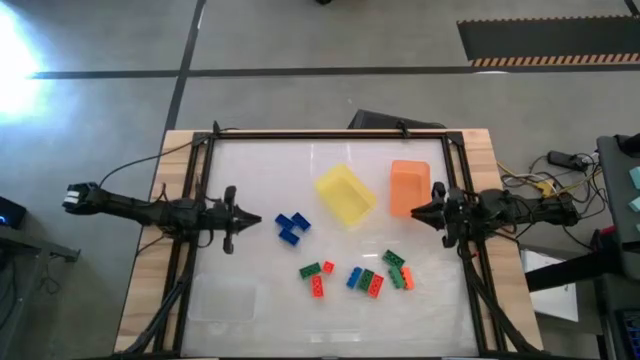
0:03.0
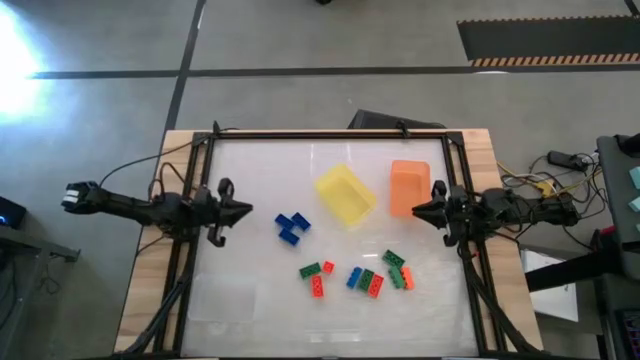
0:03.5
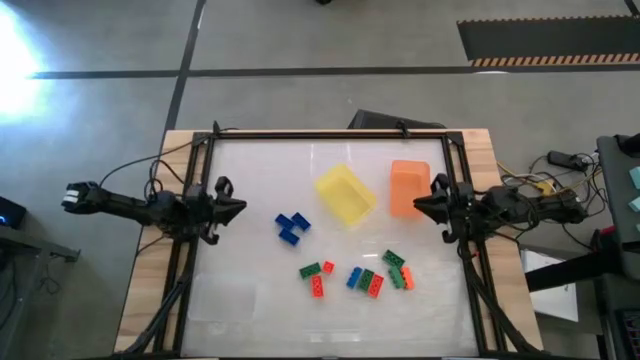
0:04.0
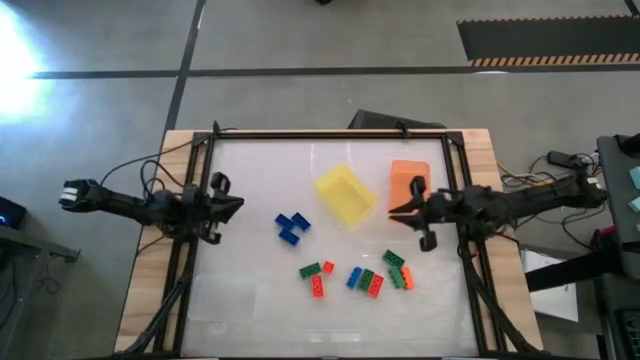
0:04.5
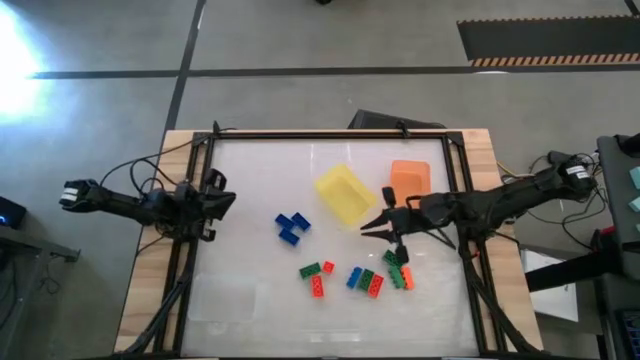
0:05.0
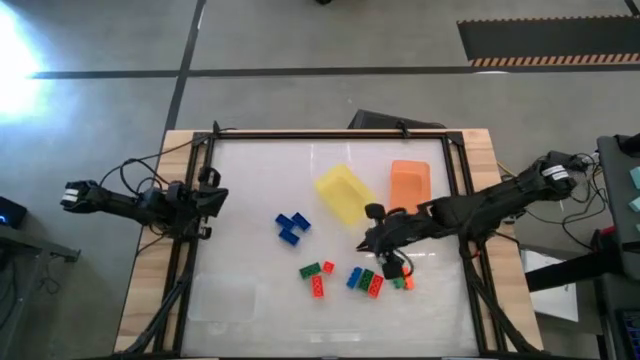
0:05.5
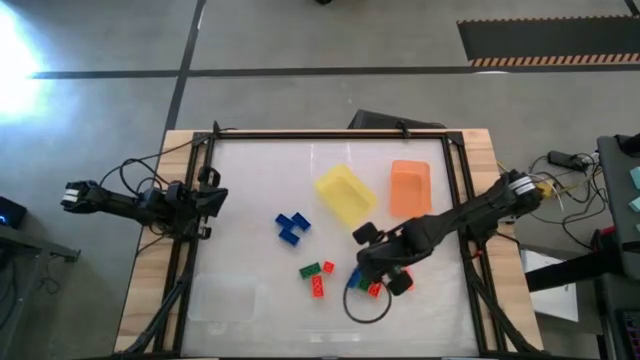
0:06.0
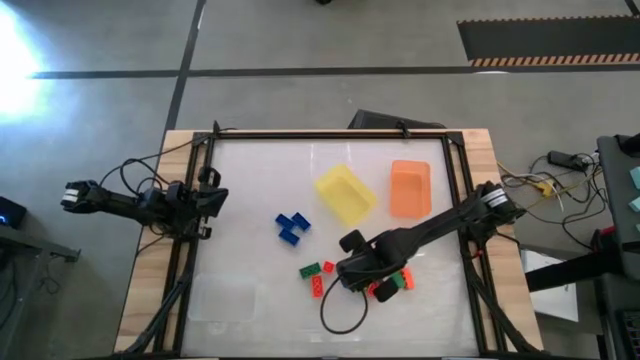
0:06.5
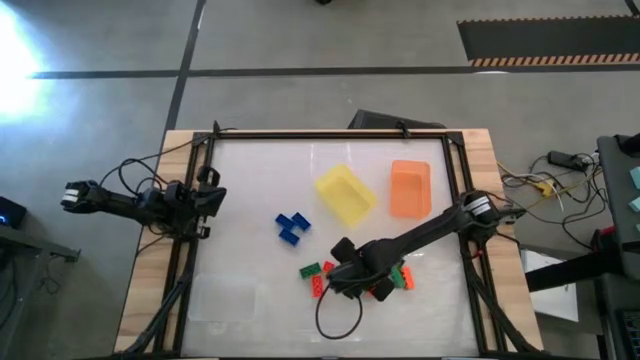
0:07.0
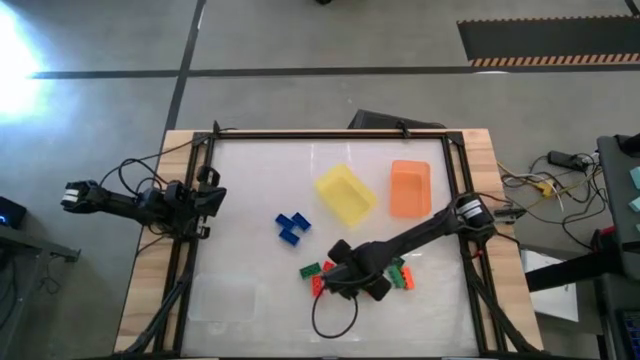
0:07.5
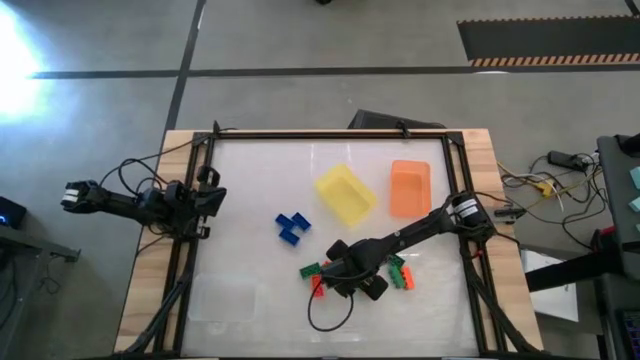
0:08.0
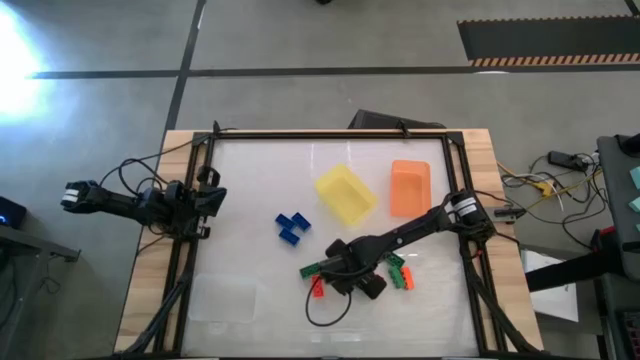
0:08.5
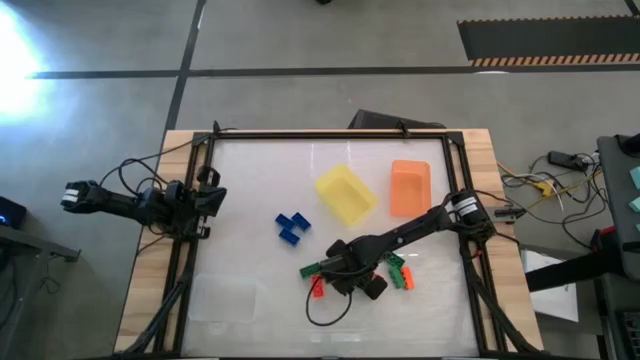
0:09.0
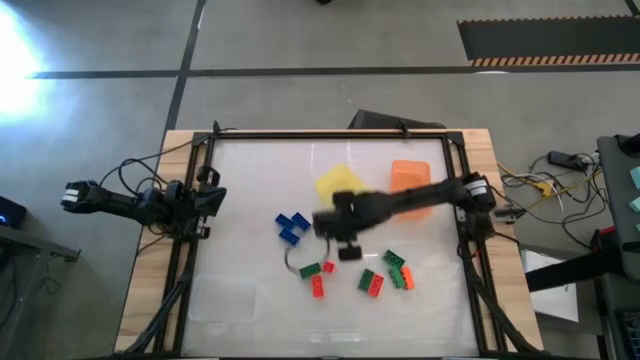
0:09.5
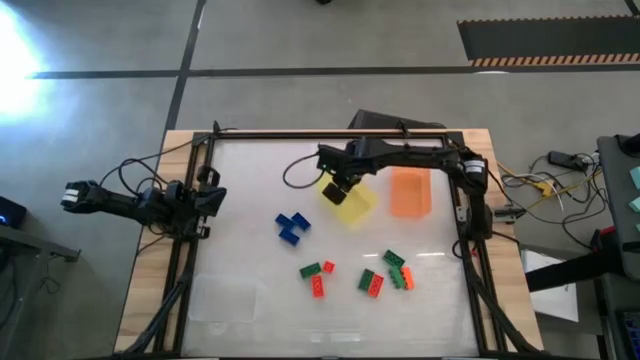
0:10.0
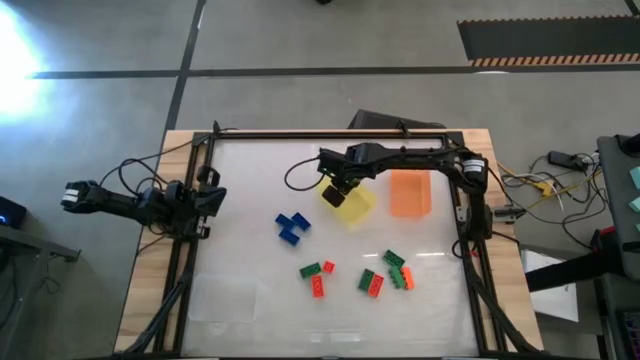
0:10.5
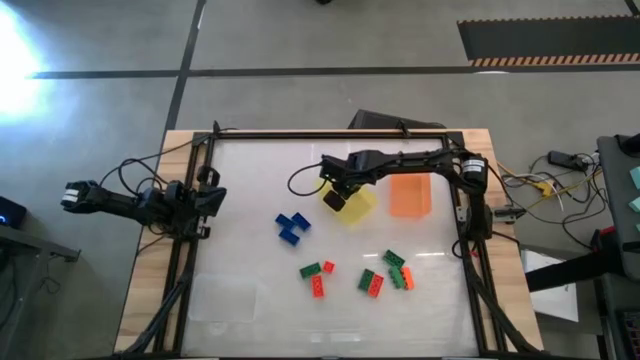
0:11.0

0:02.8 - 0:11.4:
Task: Sort & place blocks by color
Put the blue game piece into the yellow bin

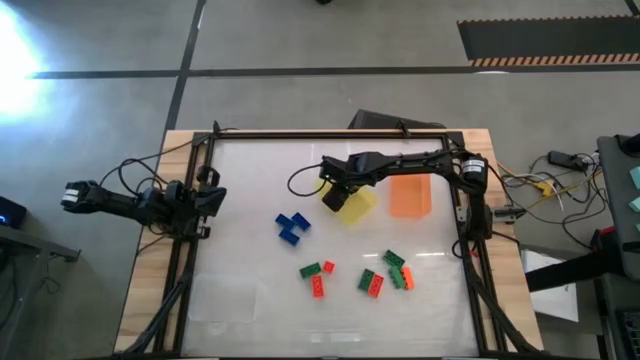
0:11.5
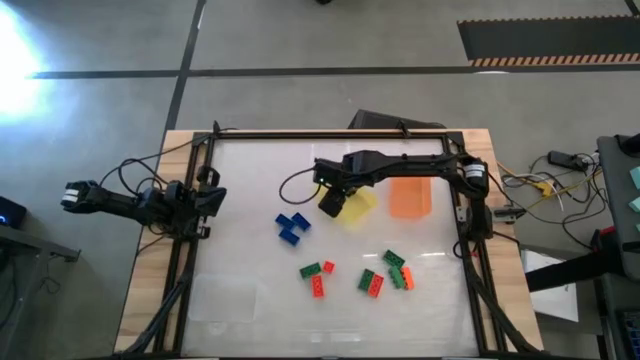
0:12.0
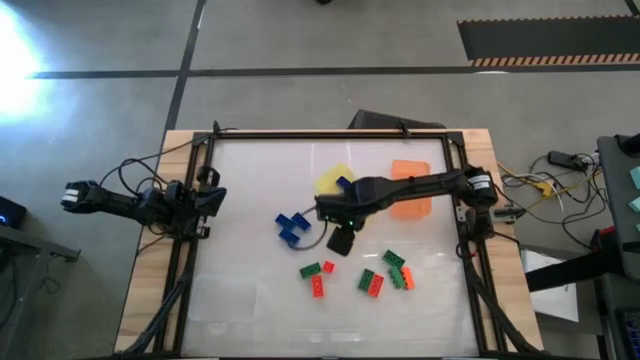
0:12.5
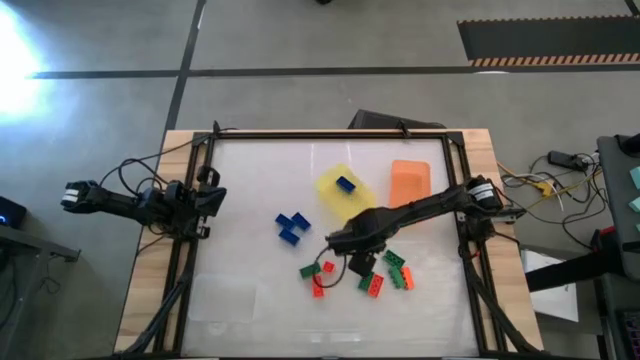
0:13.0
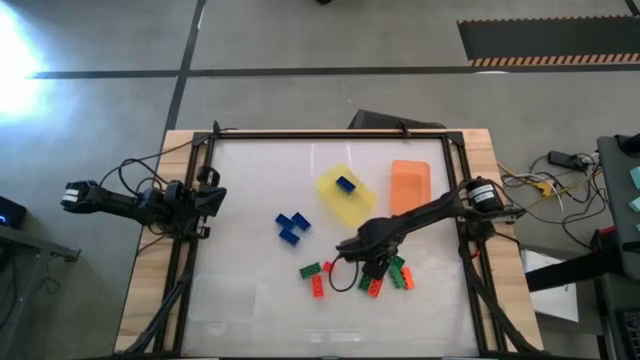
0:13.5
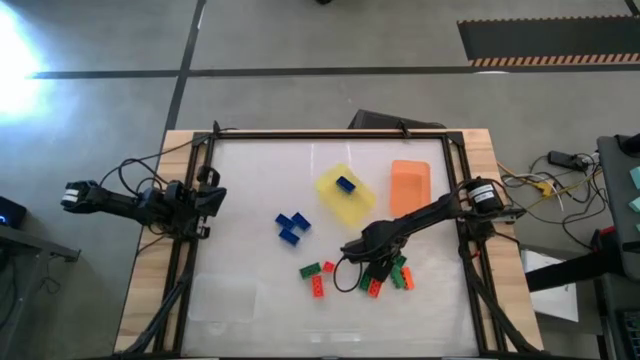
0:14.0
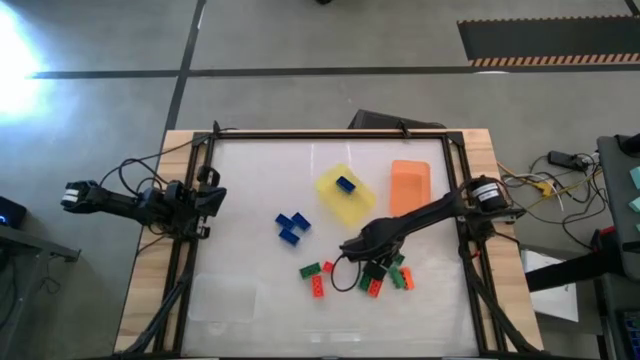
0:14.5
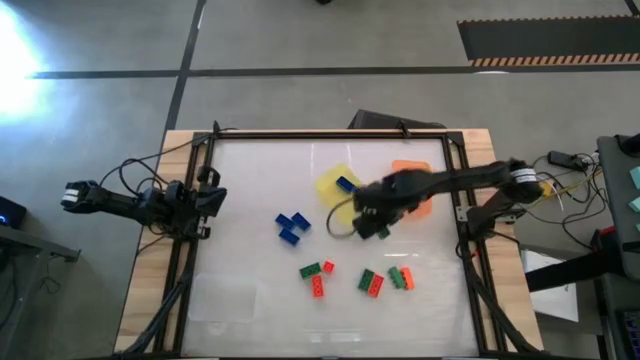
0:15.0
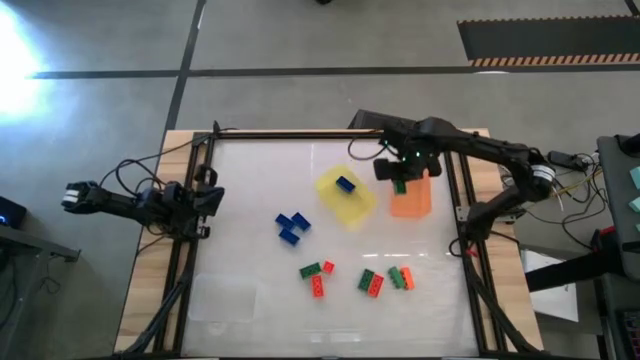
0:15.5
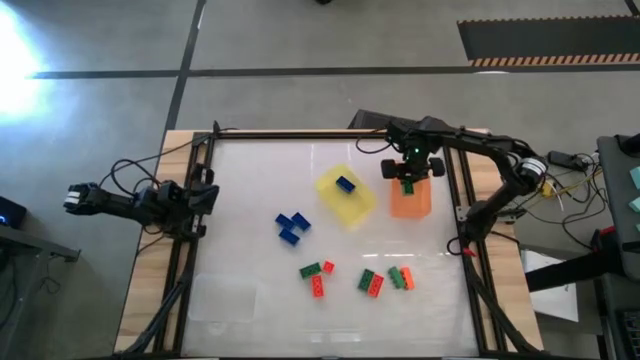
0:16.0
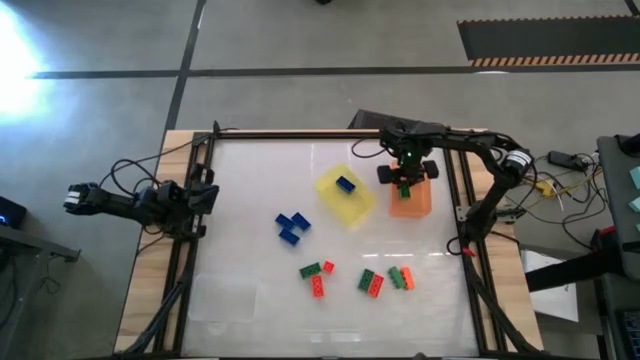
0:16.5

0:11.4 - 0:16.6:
Put the green game piece into the orange bin

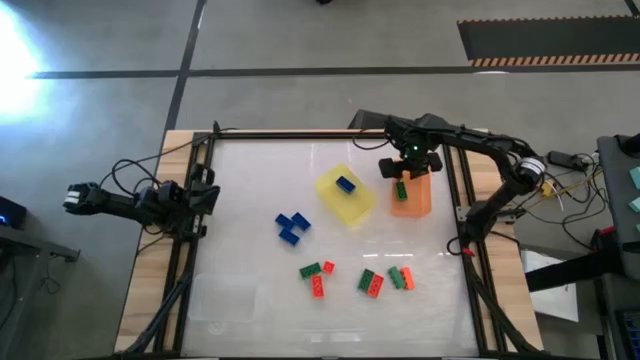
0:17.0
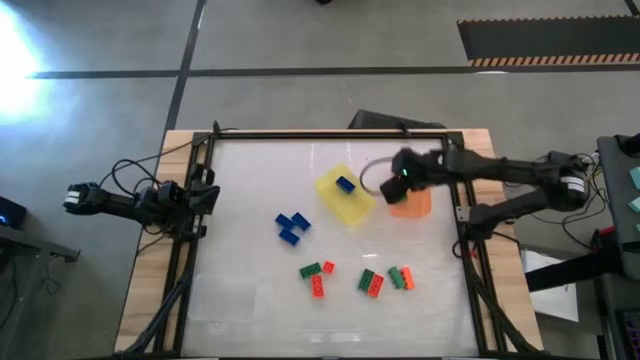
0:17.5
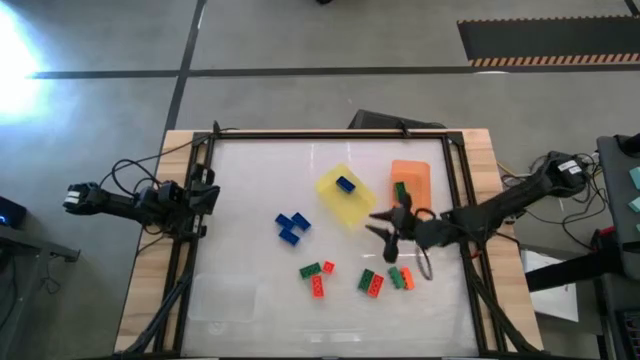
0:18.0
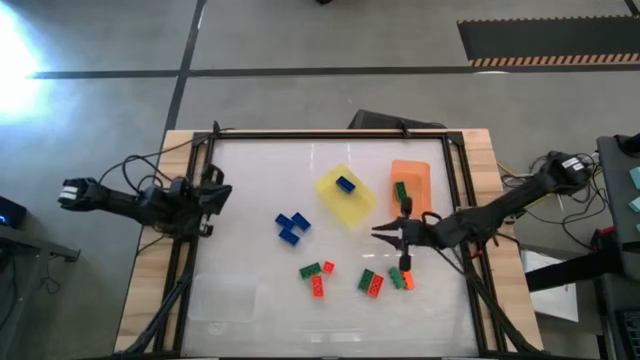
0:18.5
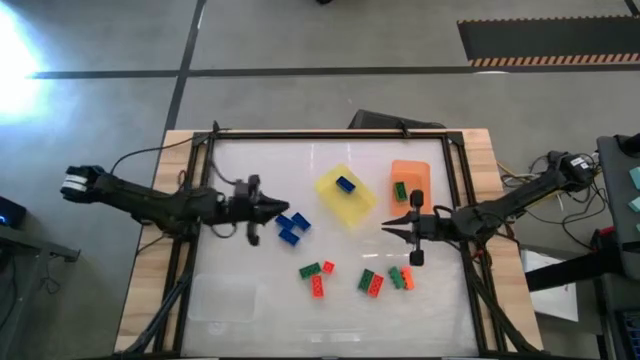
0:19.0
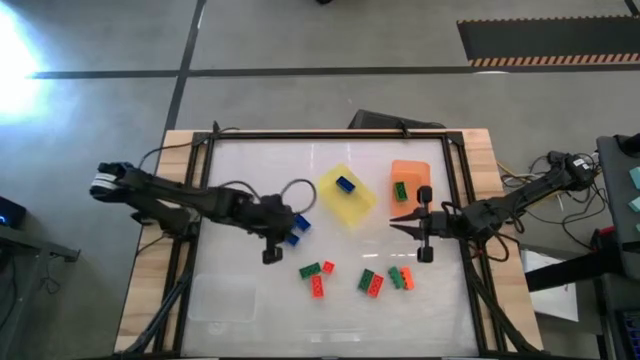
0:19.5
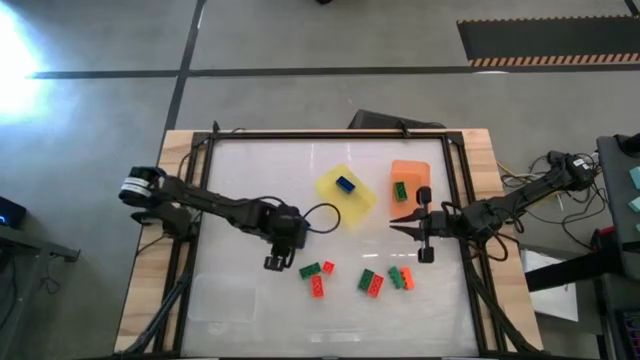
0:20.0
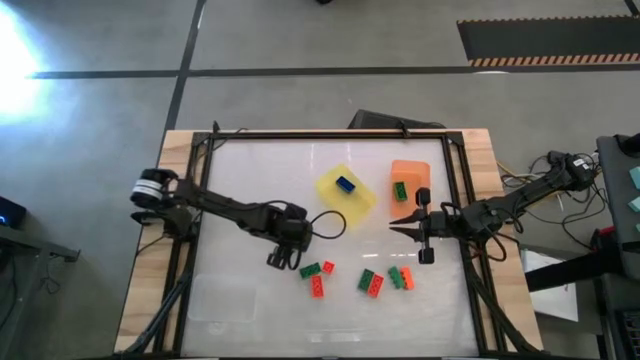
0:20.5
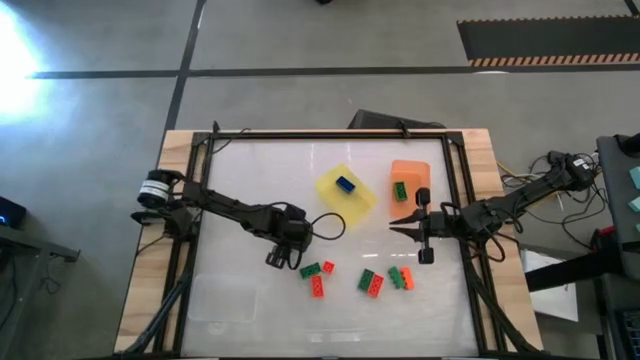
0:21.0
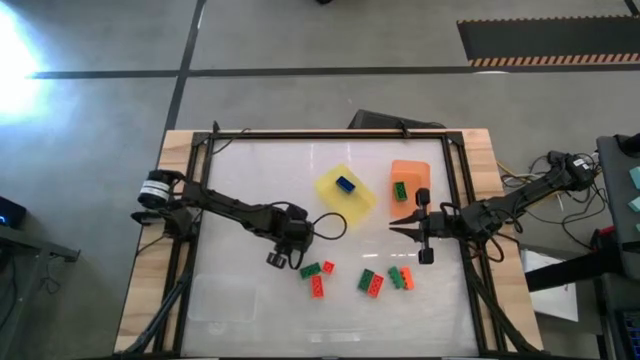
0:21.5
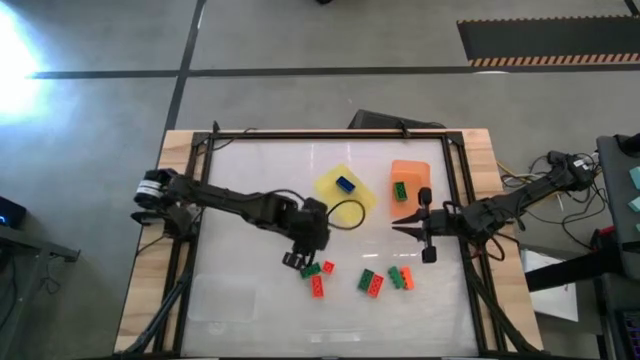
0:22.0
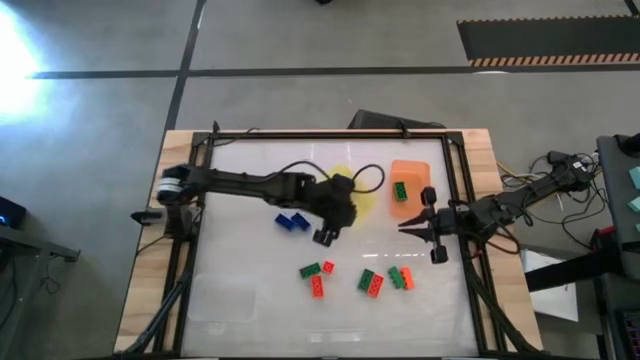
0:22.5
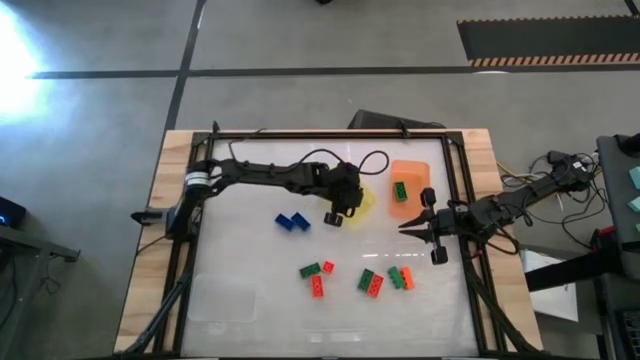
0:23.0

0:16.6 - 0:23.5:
Put the blue game piece into the yellow bin

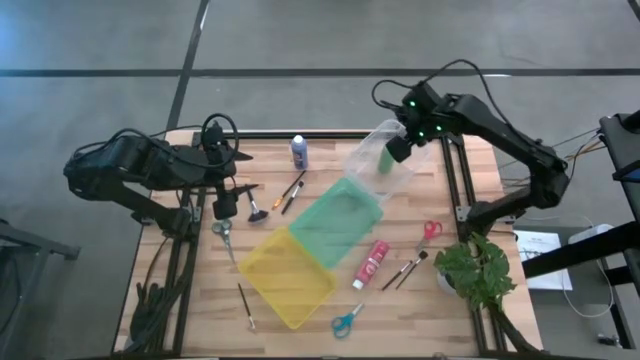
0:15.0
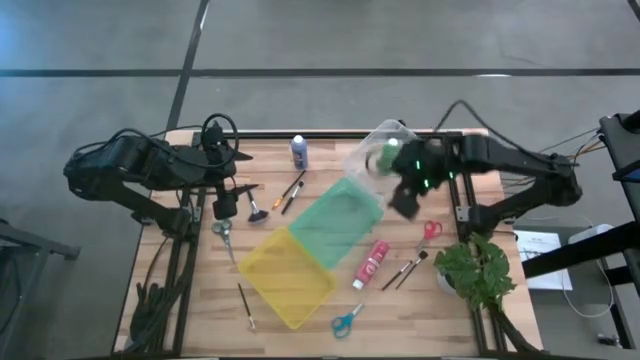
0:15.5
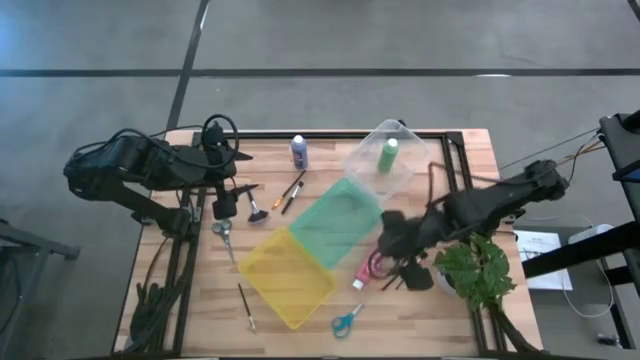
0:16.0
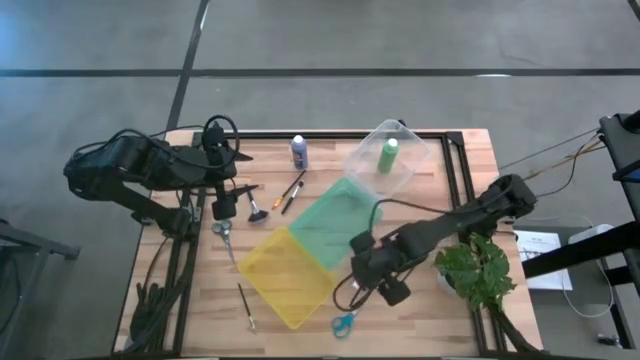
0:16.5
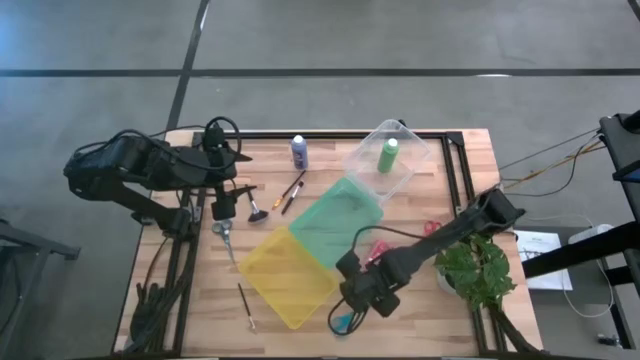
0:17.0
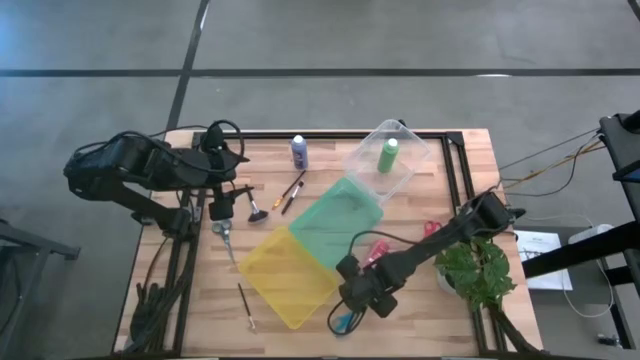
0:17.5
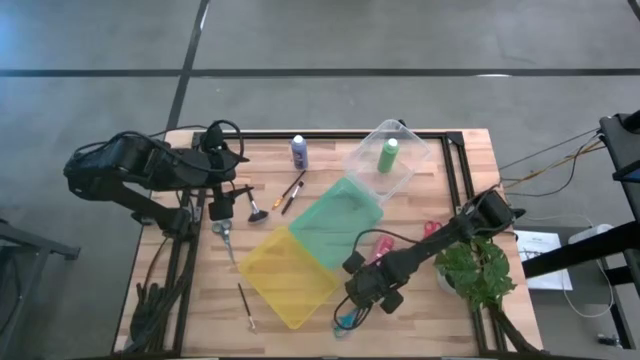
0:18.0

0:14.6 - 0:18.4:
Task: Pick & Place Paint Supplies
Put the red paint bottle into the transparent bin
